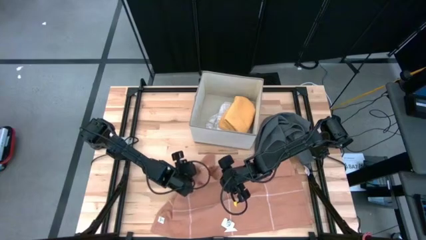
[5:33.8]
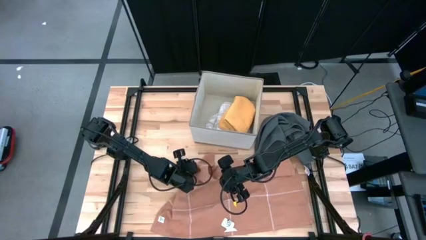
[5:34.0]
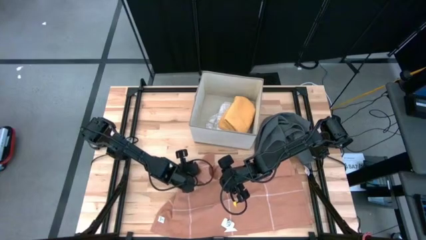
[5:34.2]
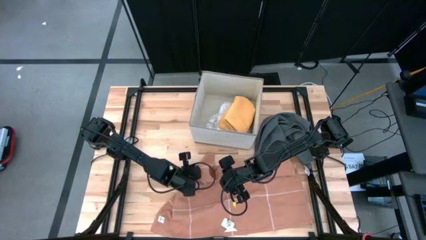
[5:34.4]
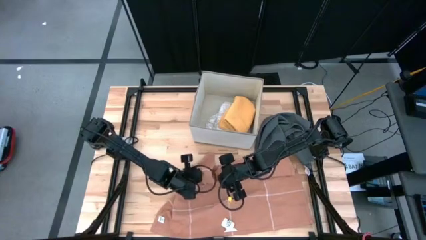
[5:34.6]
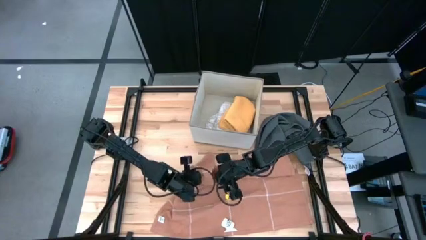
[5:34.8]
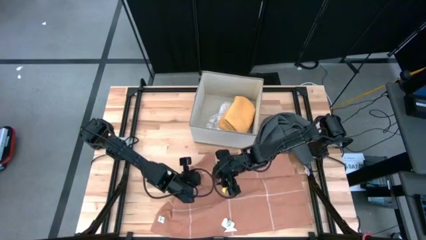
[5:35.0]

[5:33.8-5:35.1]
Task: Fold towel
Fold the light orange towel

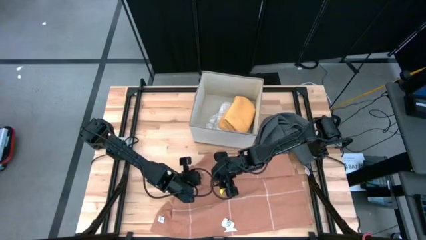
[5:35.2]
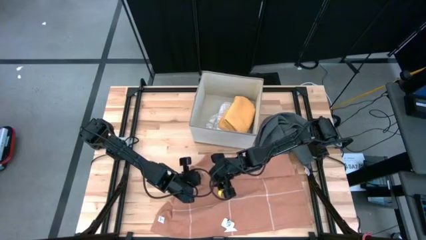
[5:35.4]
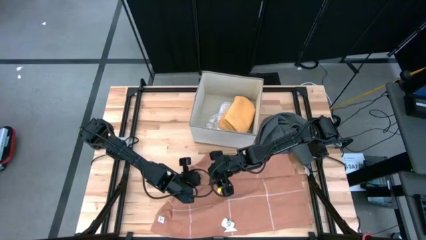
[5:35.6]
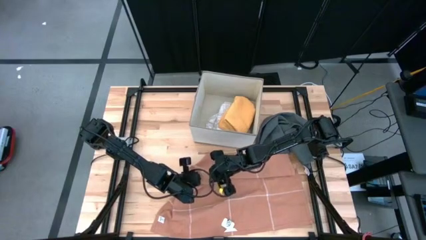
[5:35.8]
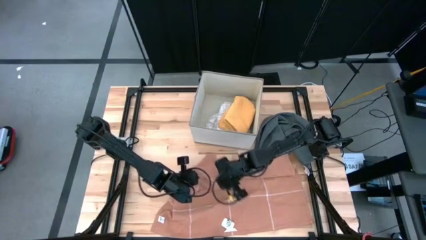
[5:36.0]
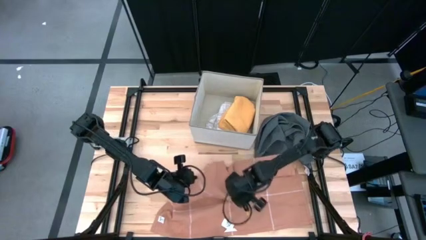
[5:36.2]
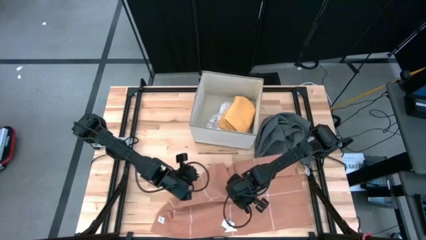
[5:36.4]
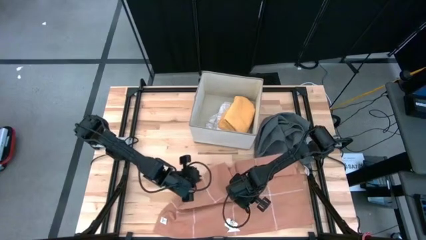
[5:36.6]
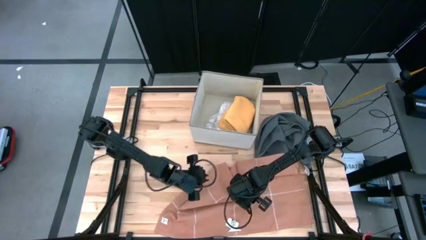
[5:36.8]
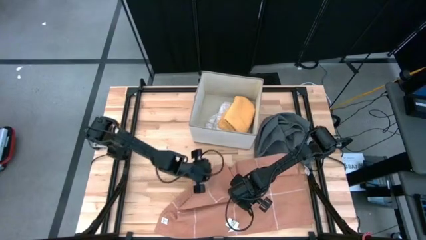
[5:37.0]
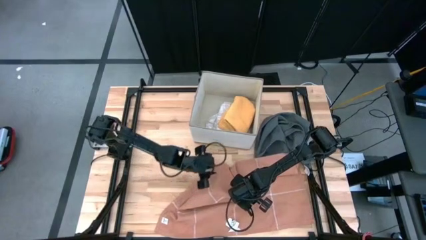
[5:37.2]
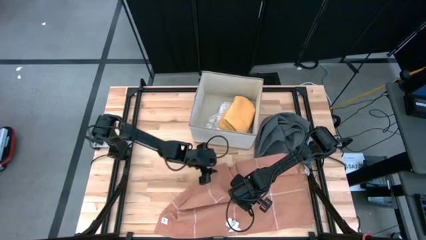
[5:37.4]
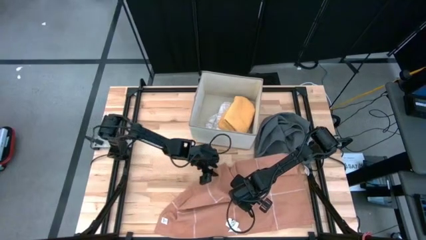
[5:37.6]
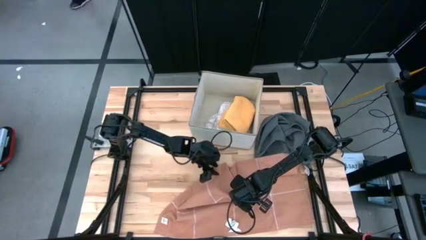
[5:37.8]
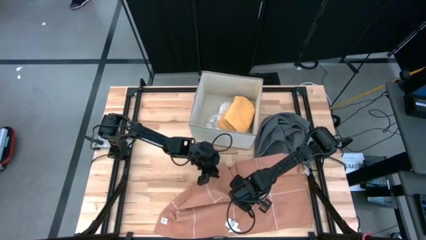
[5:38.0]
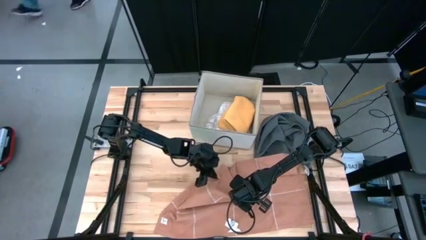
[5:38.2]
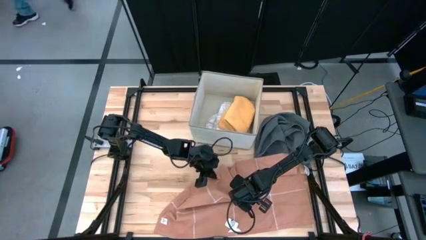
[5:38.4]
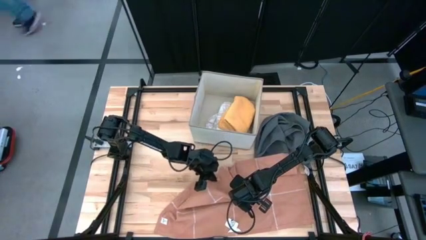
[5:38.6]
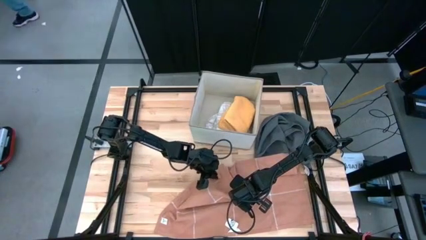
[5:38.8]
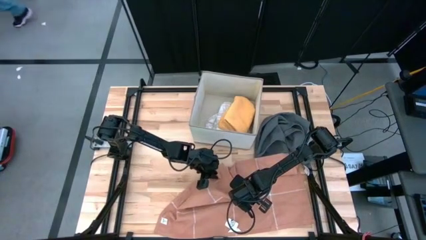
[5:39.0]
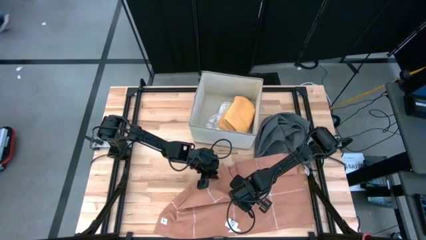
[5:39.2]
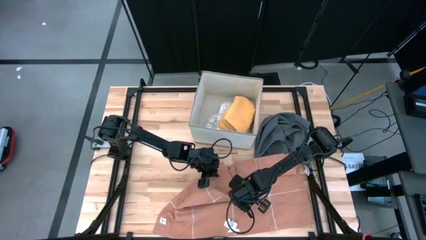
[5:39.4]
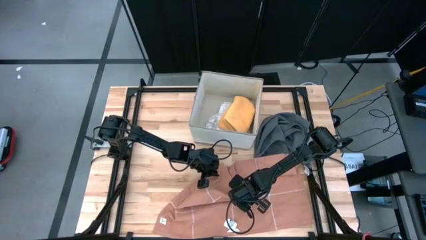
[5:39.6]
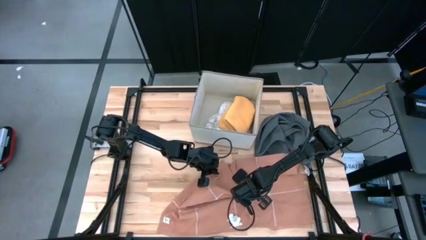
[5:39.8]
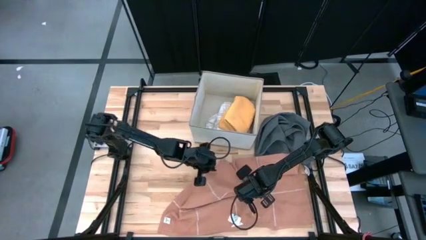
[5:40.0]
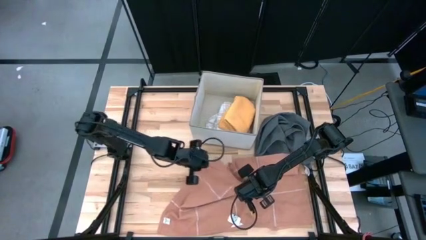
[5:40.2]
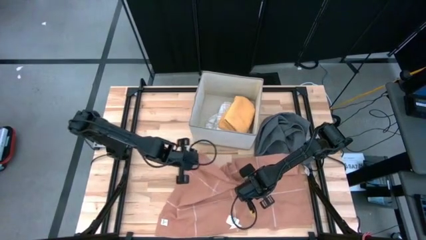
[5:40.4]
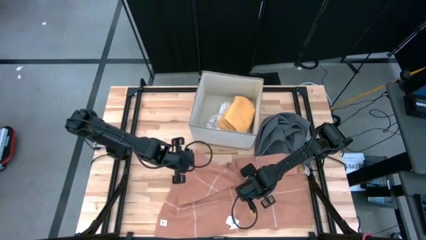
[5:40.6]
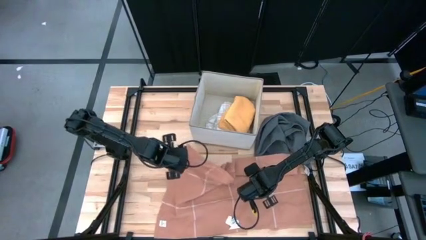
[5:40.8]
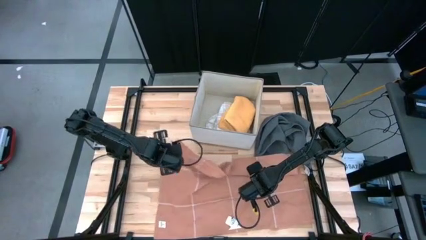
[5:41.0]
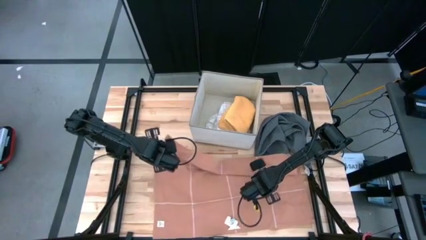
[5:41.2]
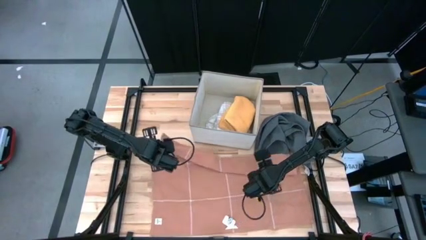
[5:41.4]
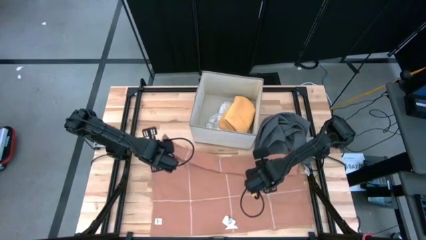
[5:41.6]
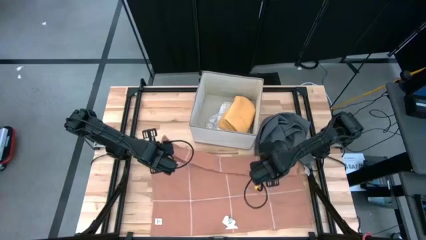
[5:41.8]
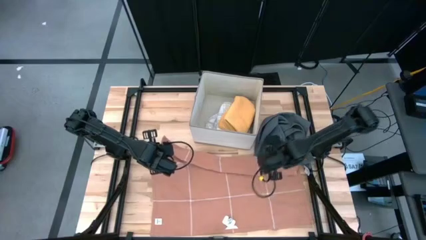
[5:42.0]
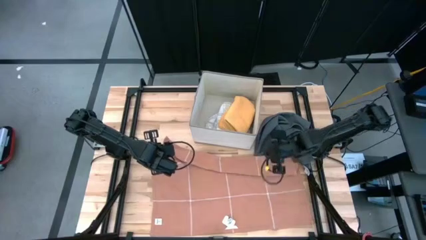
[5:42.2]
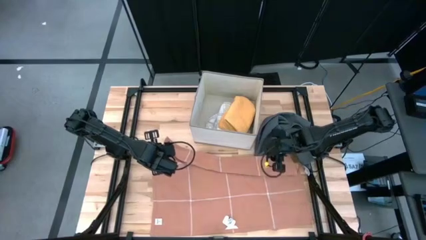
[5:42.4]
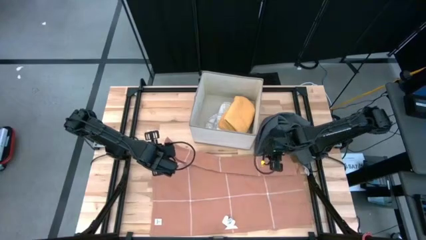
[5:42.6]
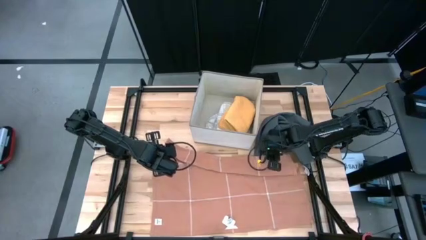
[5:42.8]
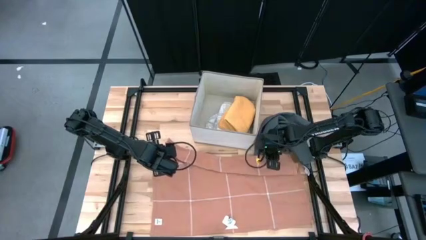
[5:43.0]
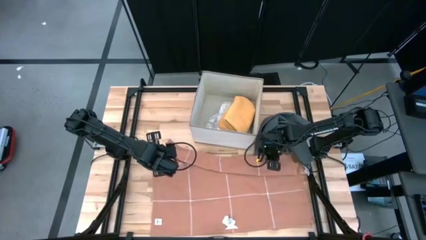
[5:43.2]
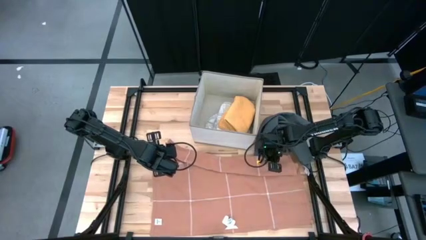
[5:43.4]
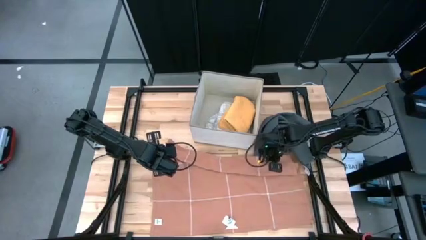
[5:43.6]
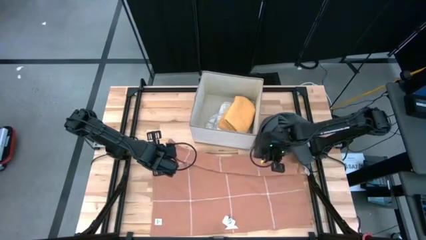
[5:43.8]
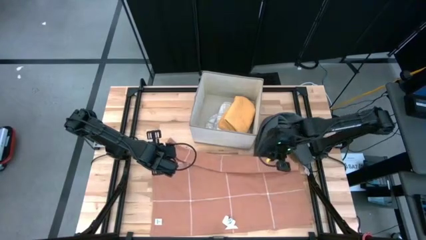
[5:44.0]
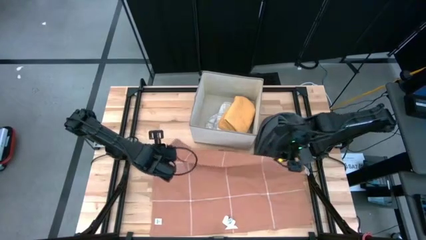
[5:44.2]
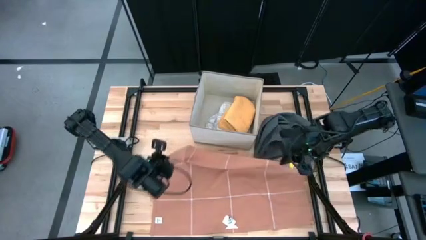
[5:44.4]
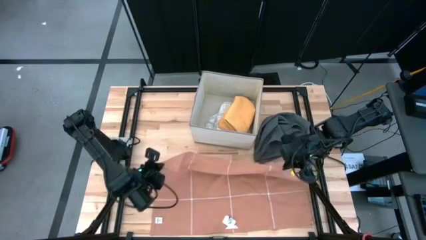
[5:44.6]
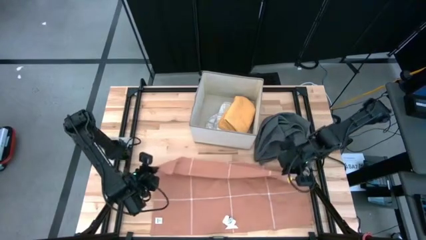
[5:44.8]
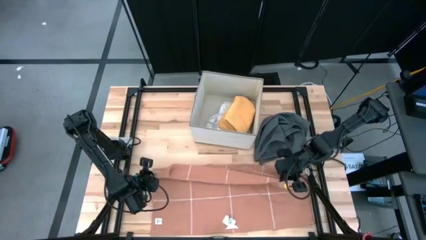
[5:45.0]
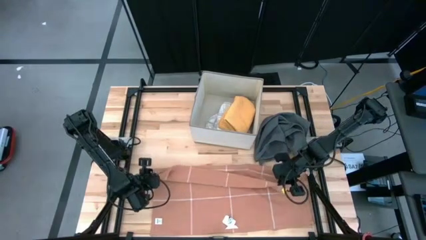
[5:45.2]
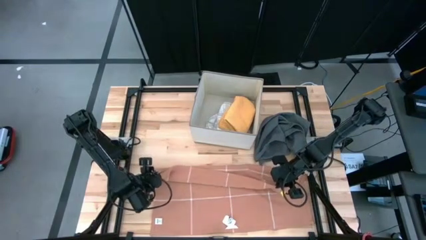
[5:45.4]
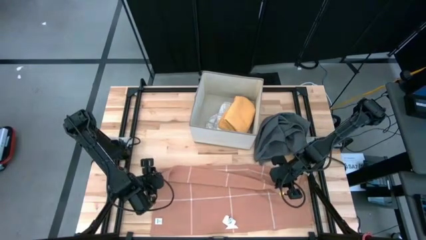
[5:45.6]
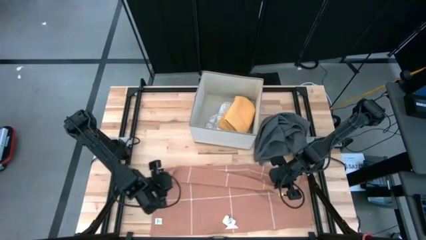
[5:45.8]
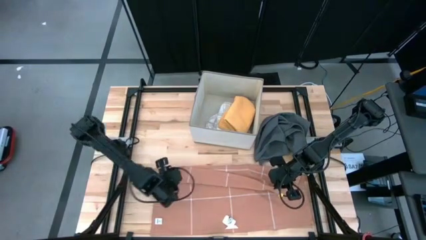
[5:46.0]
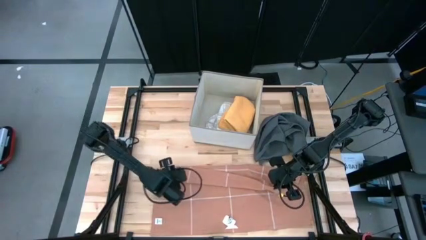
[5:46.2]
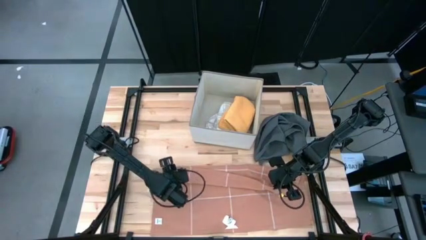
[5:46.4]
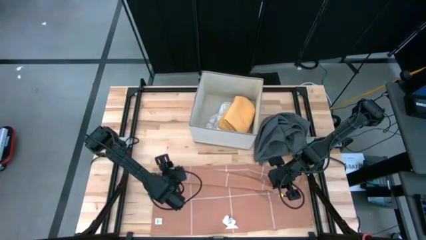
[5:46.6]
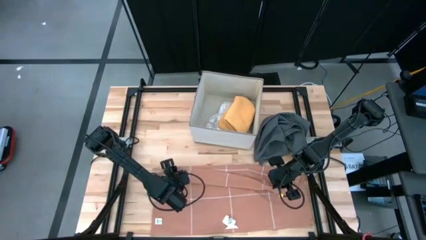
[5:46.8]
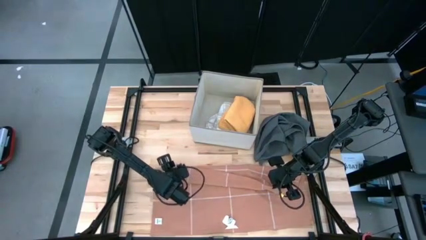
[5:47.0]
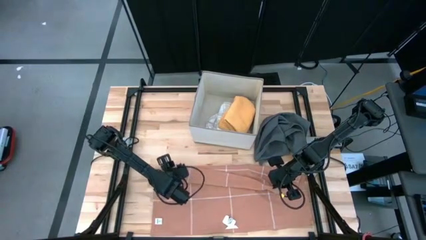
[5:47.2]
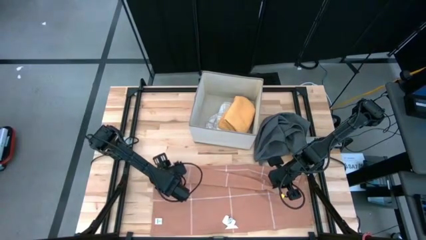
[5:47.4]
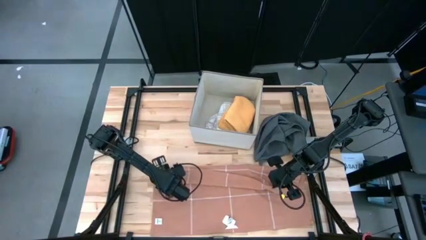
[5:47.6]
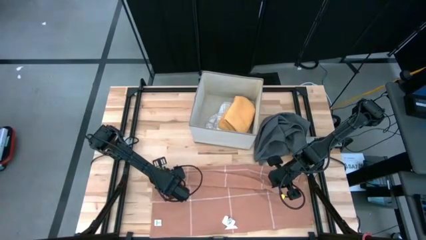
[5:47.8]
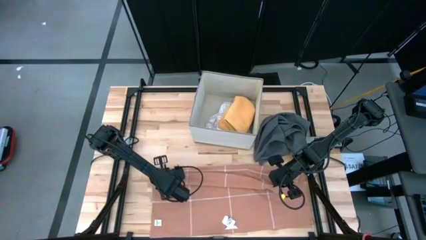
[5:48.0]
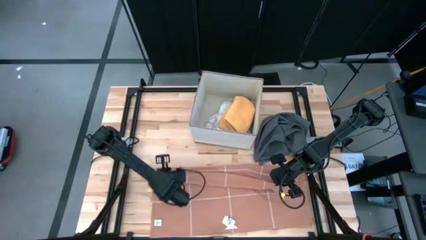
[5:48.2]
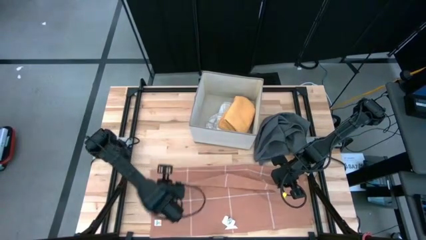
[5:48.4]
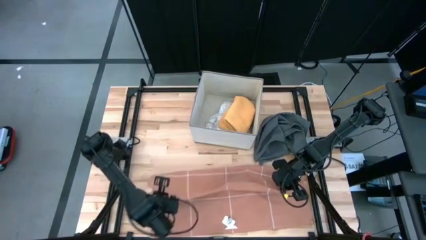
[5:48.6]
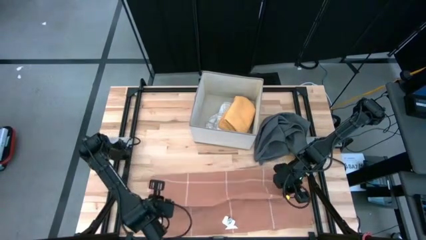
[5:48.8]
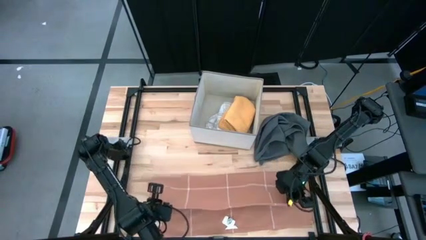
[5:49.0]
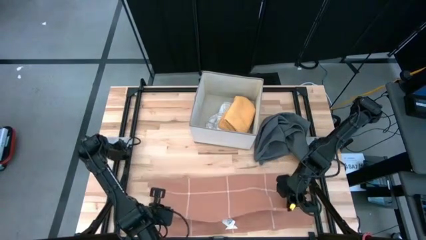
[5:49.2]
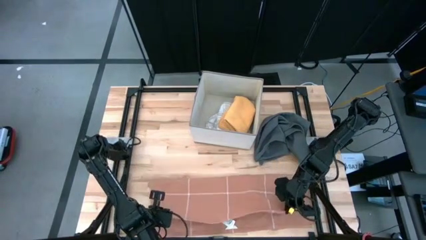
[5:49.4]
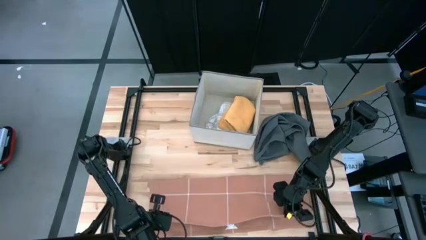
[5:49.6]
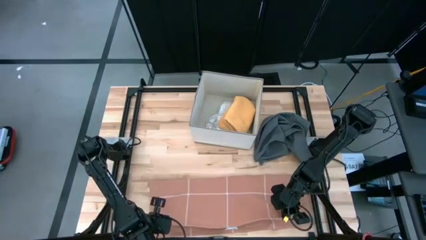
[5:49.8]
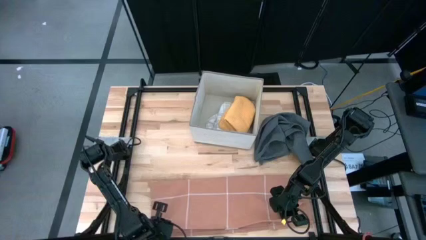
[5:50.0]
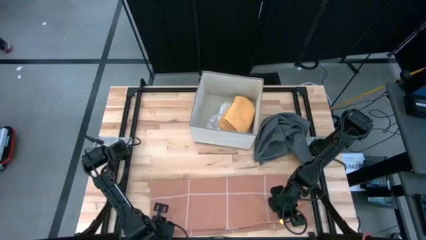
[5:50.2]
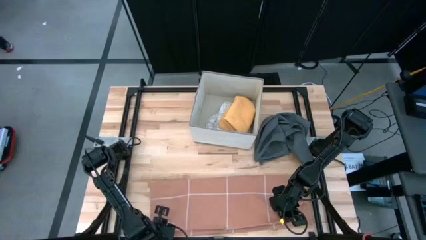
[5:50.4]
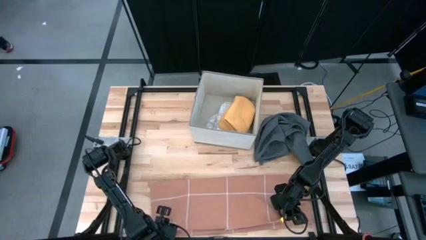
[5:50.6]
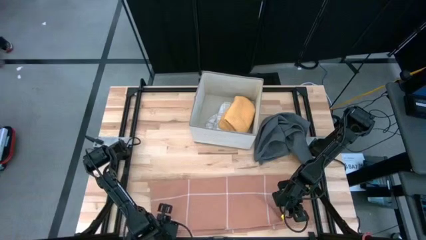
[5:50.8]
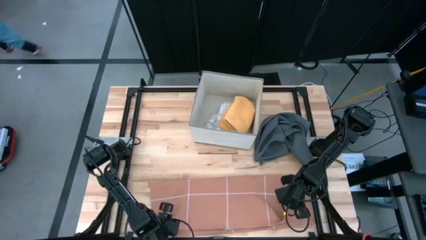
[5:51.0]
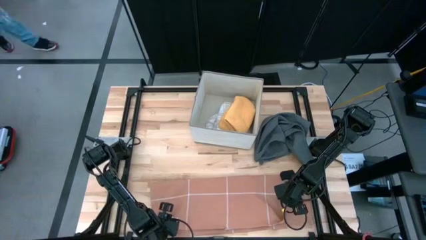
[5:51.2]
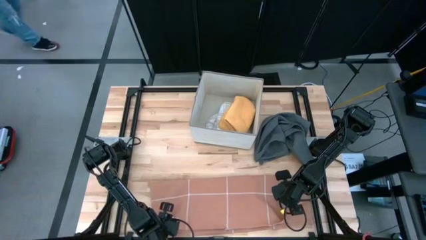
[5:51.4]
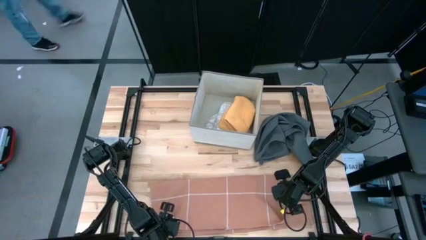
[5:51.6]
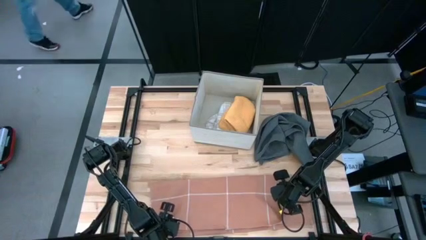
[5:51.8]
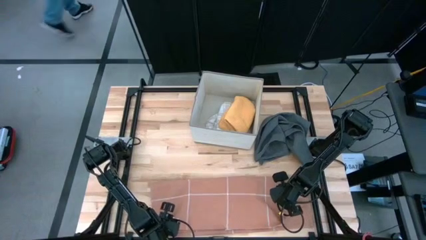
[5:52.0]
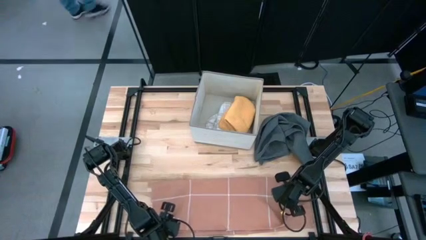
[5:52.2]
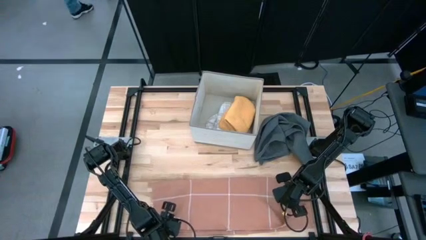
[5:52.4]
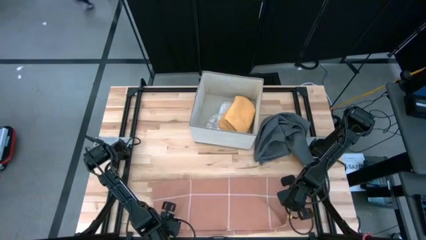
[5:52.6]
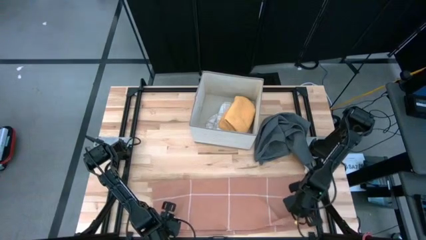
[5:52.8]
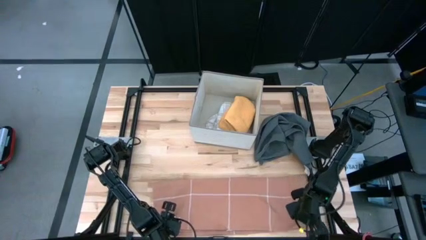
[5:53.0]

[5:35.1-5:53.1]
Fold the light orange towel
